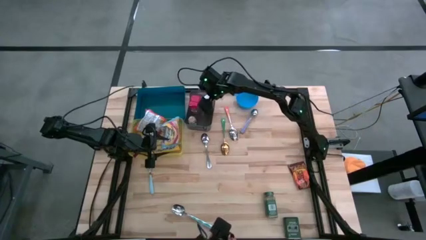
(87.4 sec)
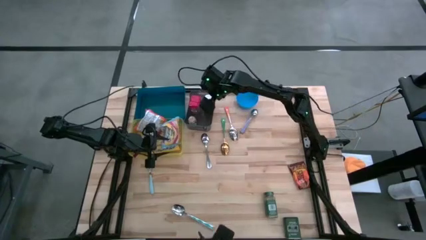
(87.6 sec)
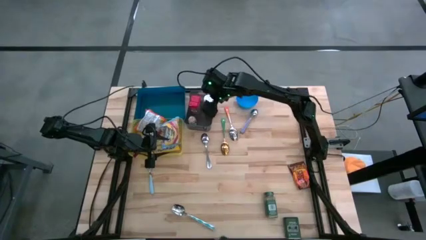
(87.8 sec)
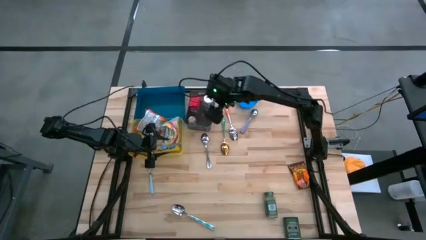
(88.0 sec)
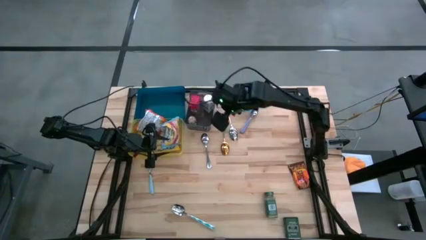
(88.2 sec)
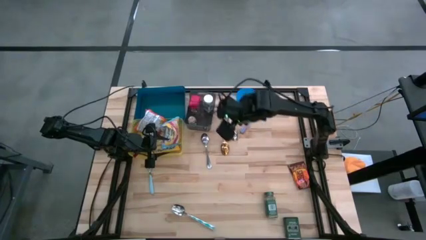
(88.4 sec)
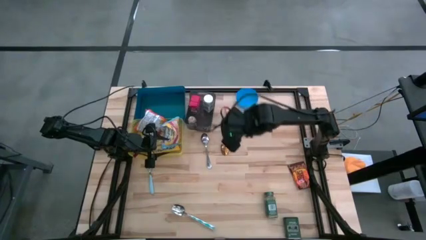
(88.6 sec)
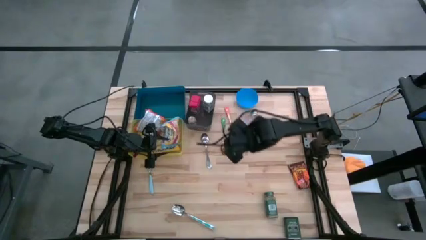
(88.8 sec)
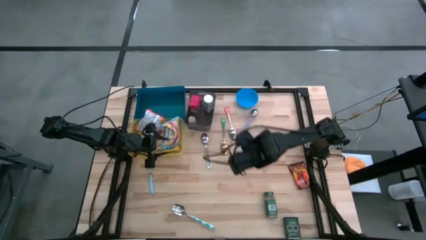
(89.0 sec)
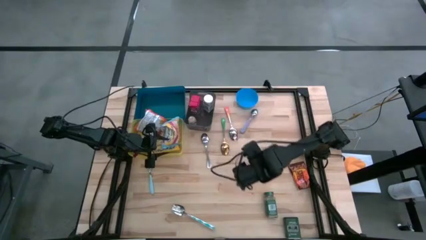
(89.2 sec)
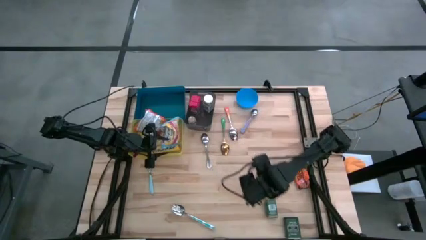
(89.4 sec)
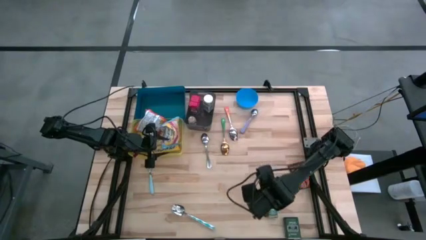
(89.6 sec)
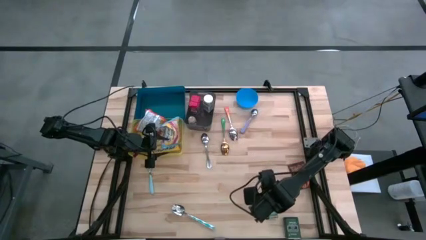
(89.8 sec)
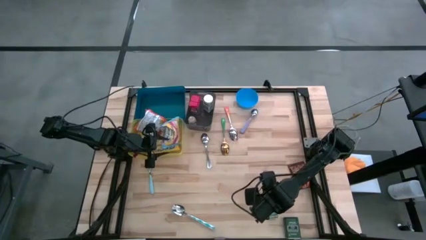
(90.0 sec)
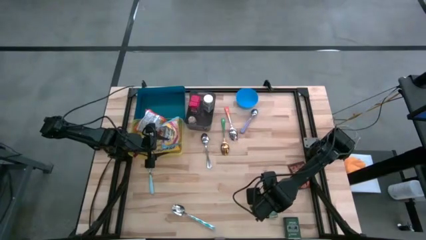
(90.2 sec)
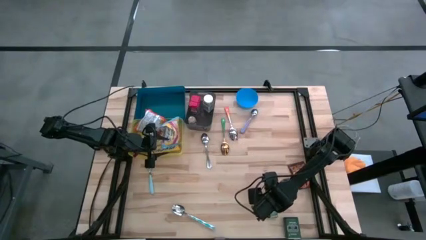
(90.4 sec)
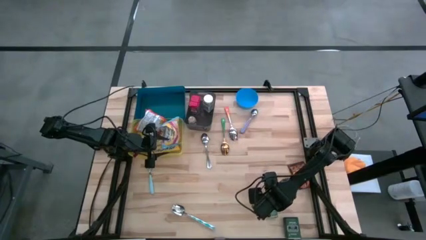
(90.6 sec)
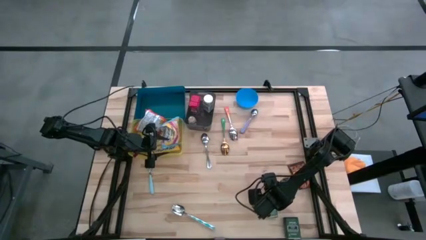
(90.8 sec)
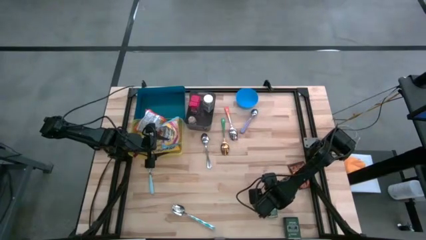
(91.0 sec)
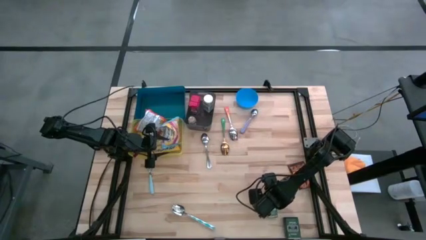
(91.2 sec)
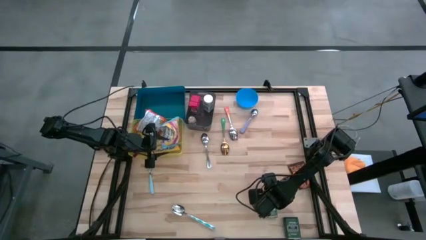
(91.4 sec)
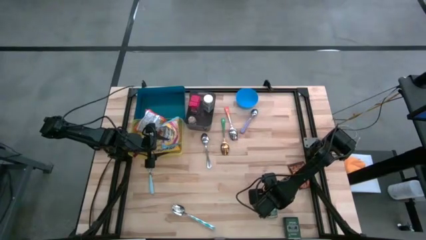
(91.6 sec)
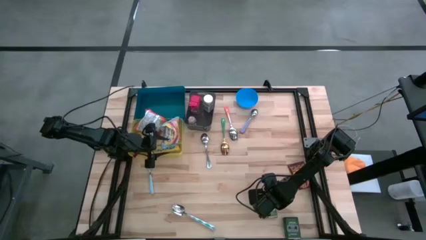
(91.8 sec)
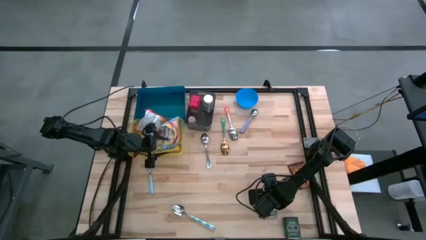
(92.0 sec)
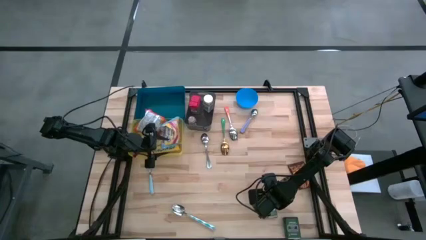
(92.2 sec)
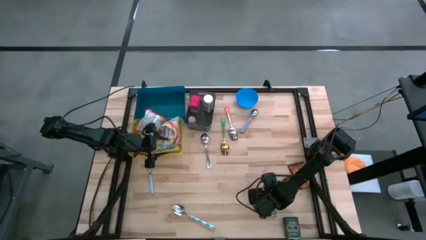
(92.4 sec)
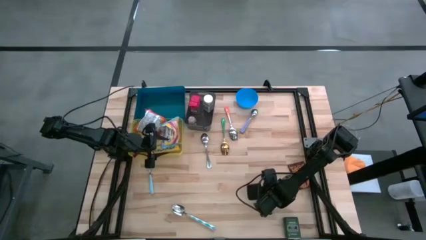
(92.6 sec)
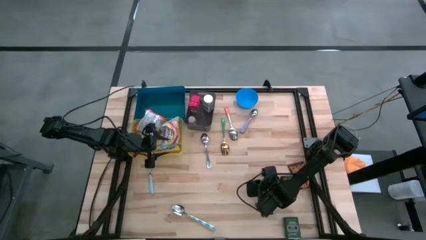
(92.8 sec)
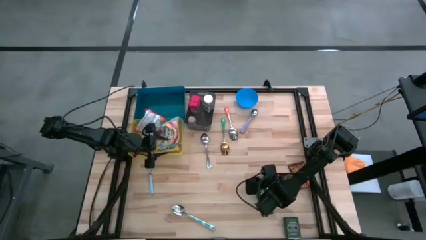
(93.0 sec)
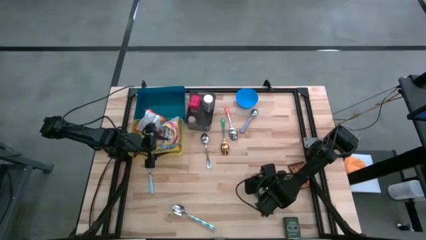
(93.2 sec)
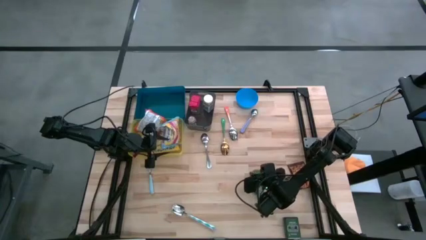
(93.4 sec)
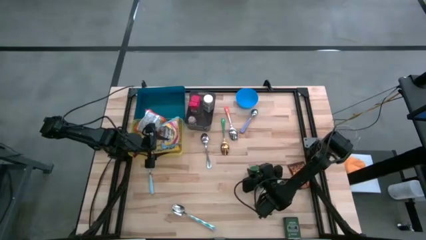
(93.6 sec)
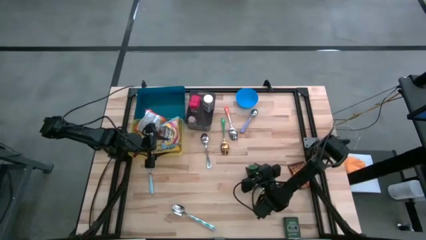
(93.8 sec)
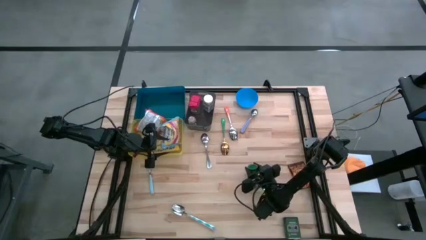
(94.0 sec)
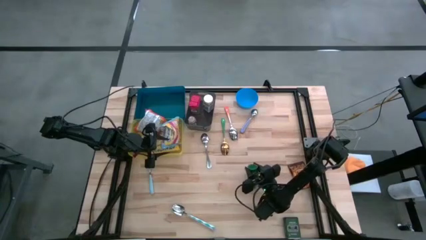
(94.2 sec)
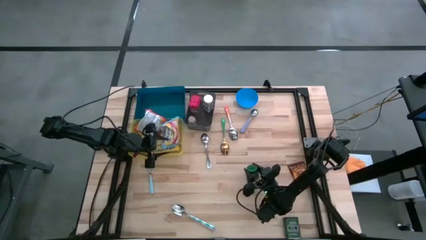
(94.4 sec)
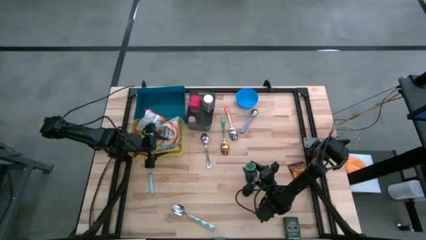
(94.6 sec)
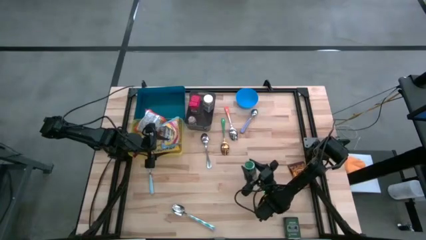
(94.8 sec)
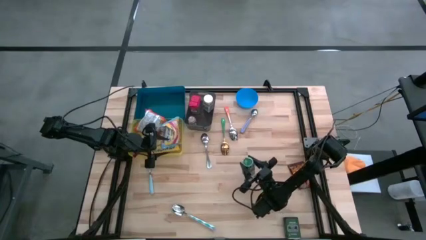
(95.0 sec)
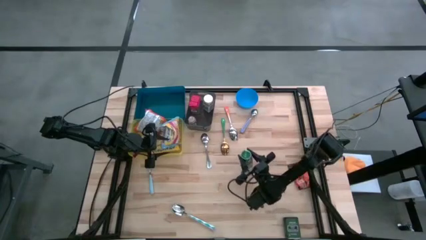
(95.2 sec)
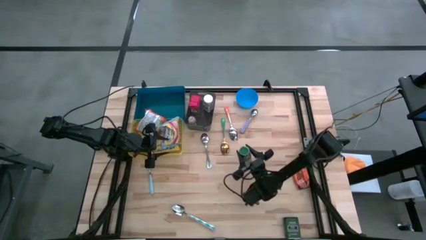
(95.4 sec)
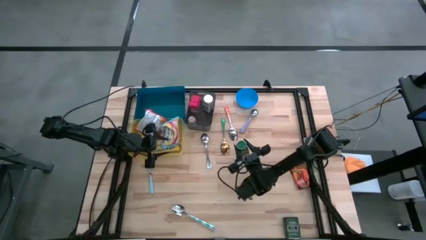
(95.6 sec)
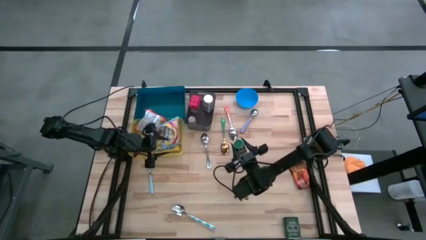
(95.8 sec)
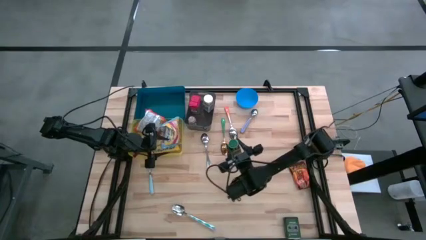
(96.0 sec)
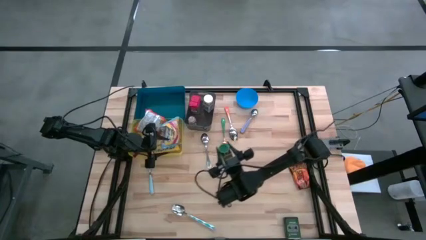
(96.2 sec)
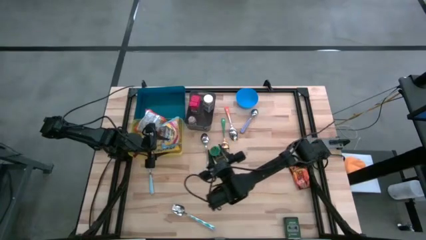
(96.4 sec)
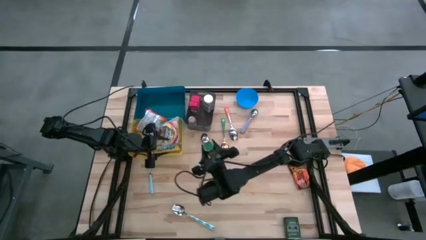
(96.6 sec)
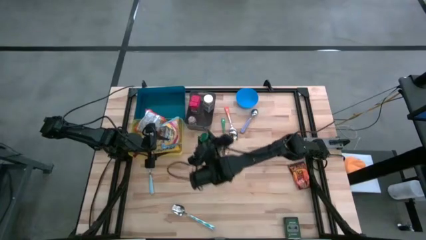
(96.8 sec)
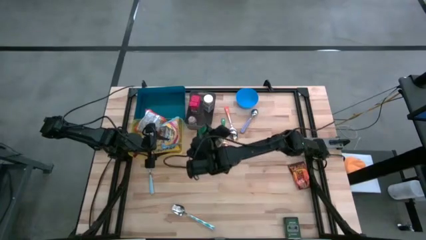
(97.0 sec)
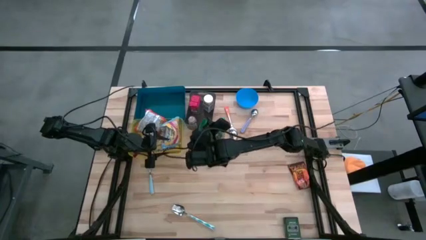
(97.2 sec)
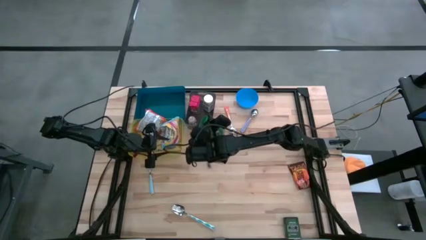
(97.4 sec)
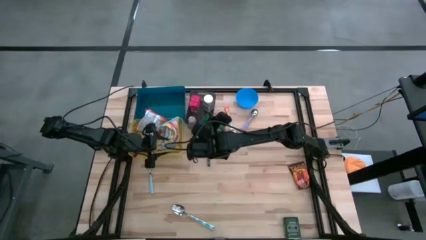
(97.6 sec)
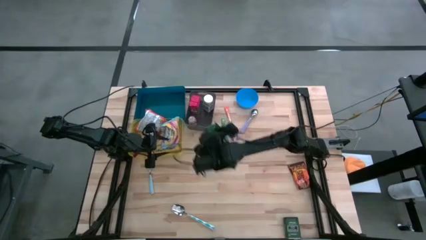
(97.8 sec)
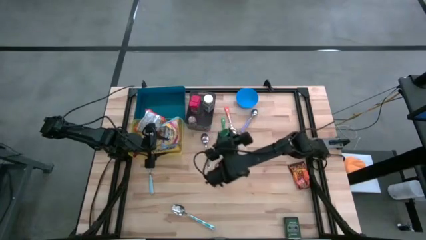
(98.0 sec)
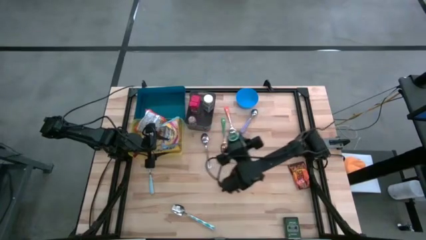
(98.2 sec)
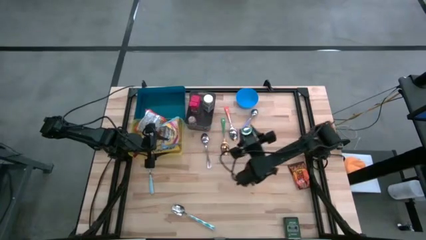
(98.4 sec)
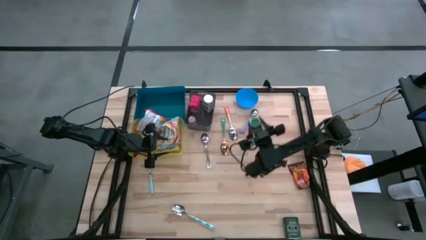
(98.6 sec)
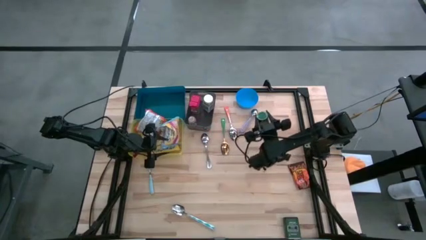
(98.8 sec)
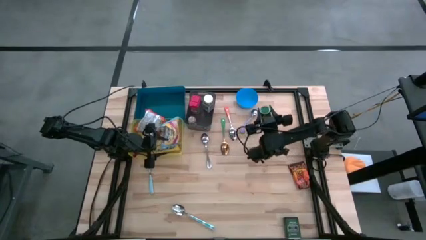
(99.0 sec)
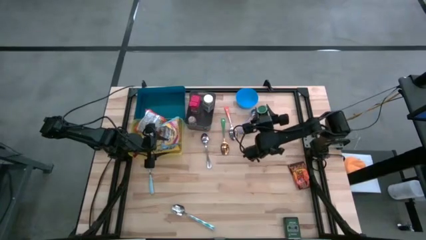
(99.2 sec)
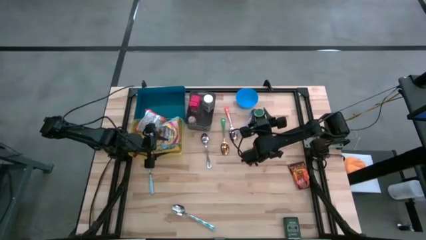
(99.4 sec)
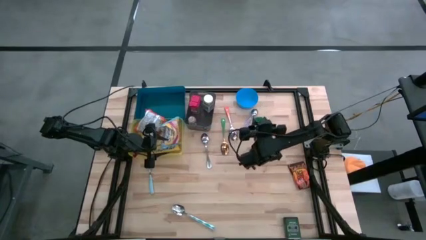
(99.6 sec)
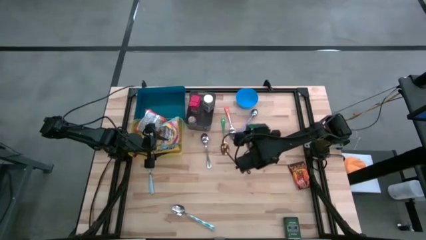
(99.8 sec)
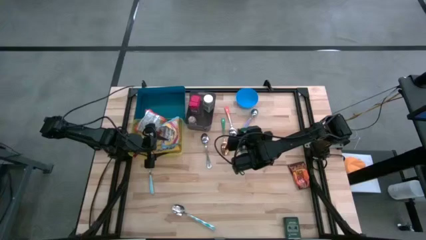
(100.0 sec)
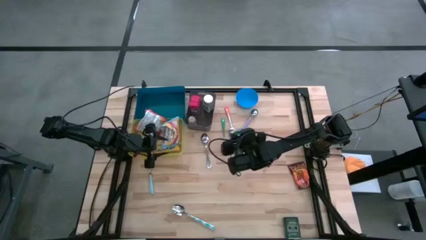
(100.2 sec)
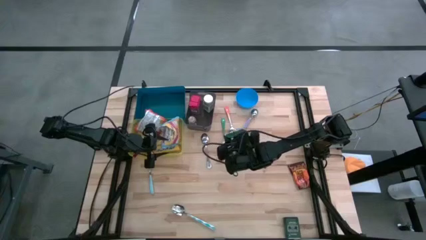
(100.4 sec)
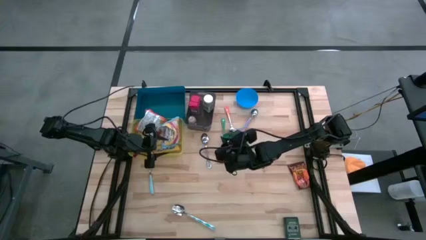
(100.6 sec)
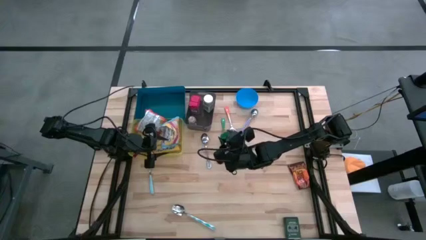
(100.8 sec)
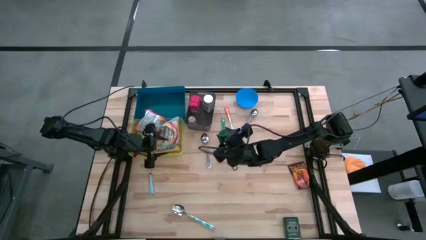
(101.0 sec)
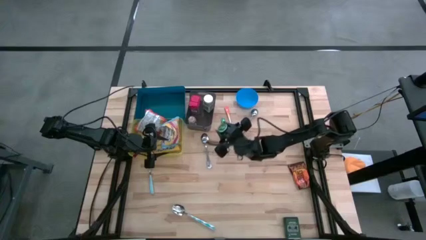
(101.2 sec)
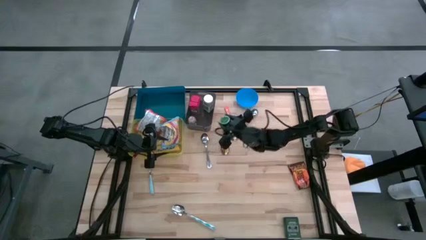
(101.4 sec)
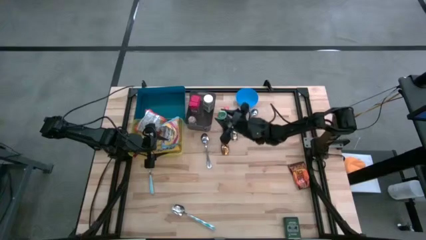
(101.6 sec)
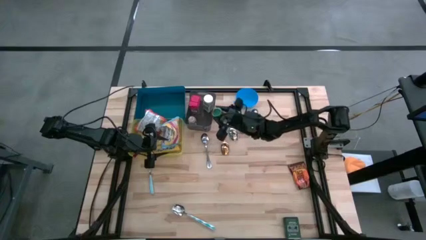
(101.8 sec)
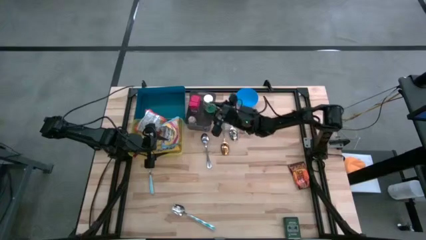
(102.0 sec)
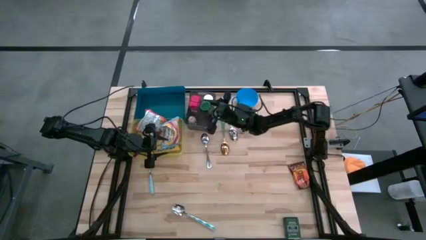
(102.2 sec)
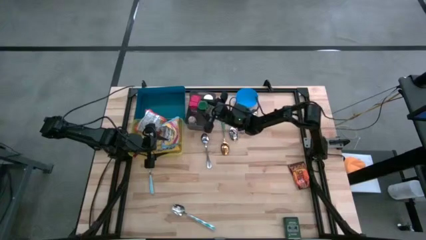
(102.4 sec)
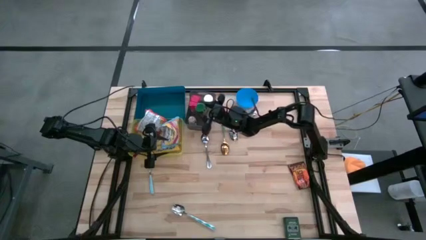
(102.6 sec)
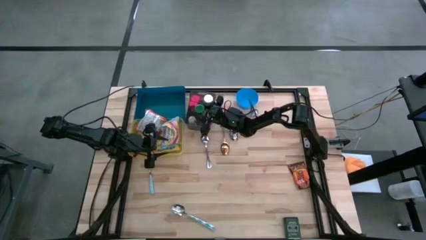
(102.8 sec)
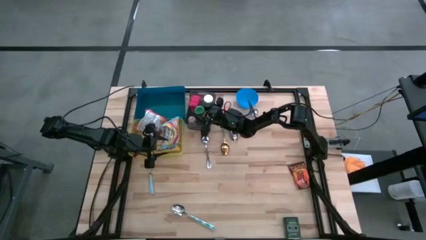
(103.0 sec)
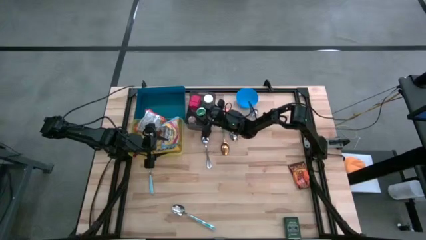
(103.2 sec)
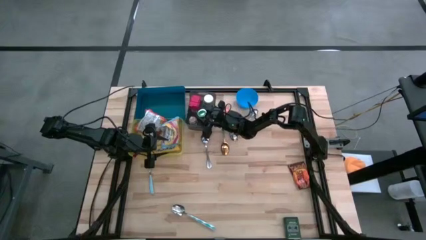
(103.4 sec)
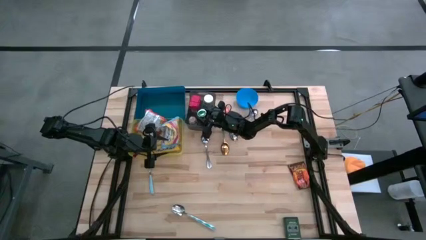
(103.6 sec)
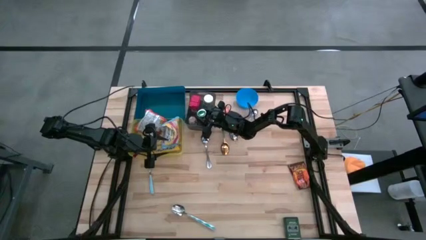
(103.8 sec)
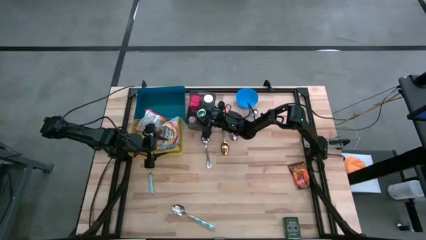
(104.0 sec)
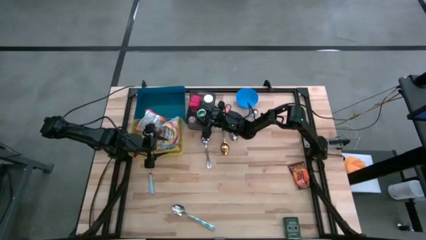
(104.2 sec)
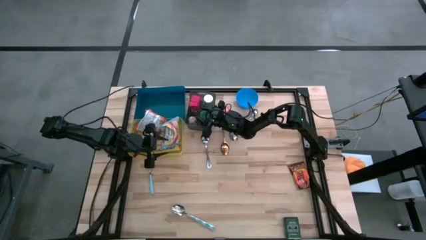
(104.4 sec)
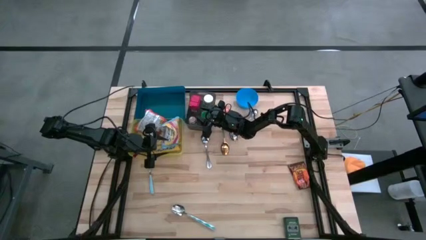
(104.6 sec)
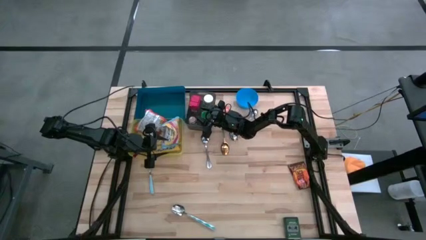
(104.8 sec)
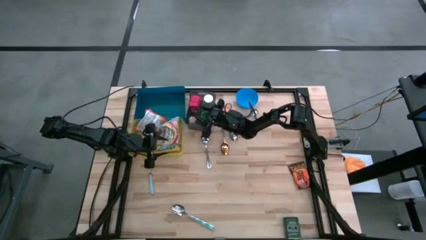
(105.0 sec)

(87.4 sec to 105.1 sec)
Put the green seasoning bottle into the black bin
